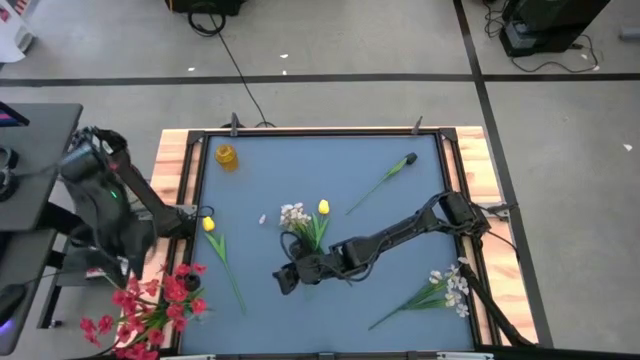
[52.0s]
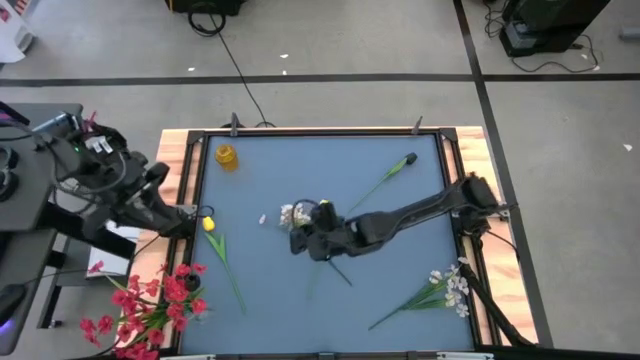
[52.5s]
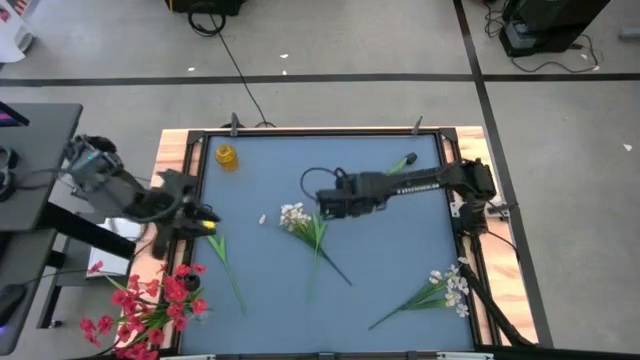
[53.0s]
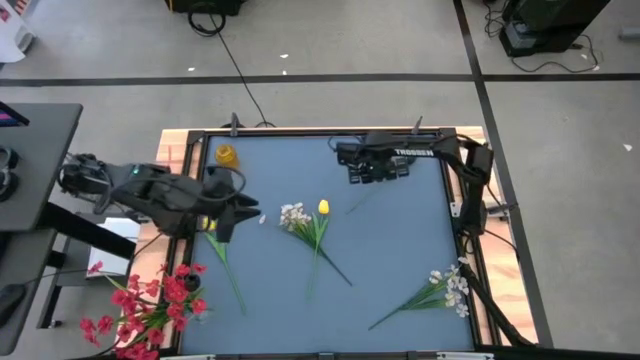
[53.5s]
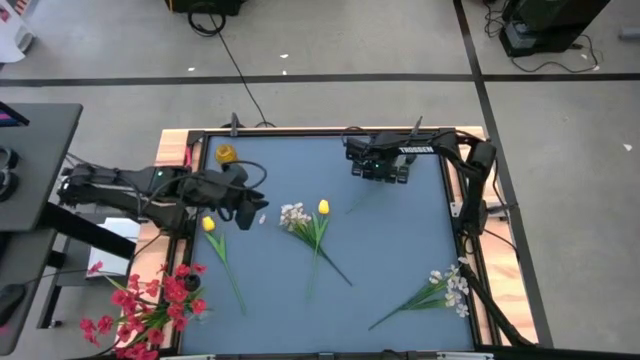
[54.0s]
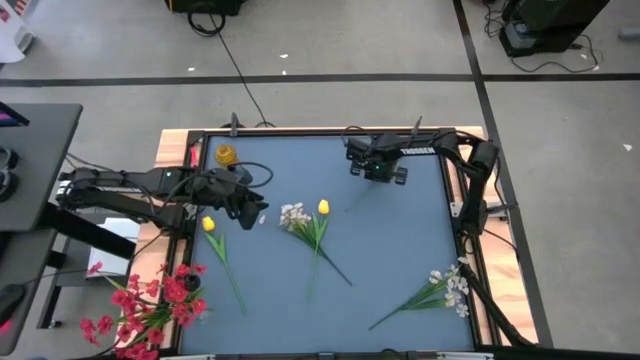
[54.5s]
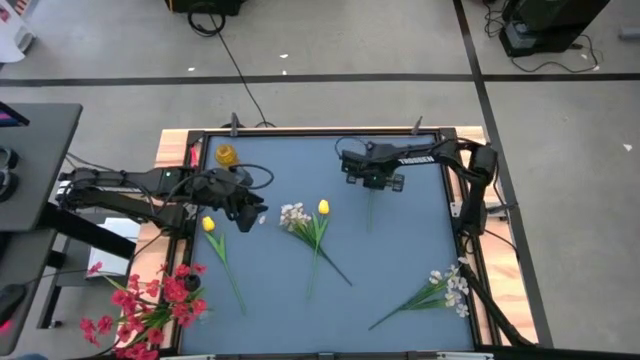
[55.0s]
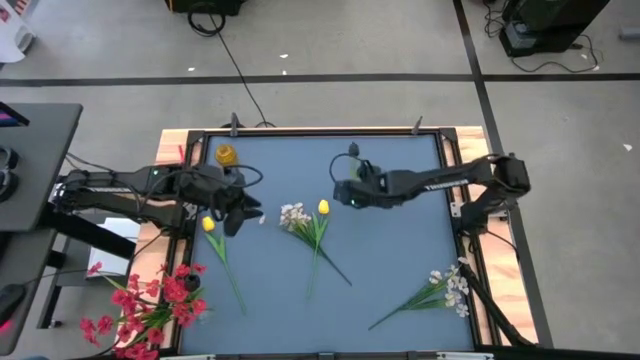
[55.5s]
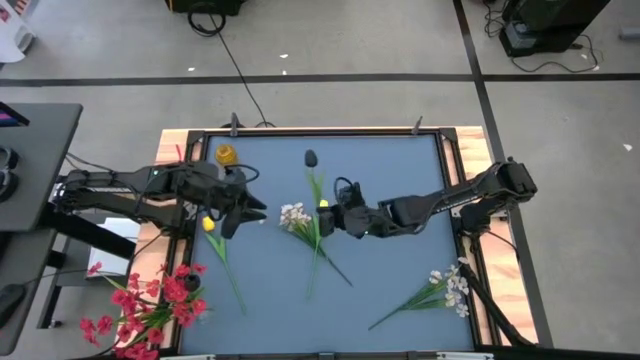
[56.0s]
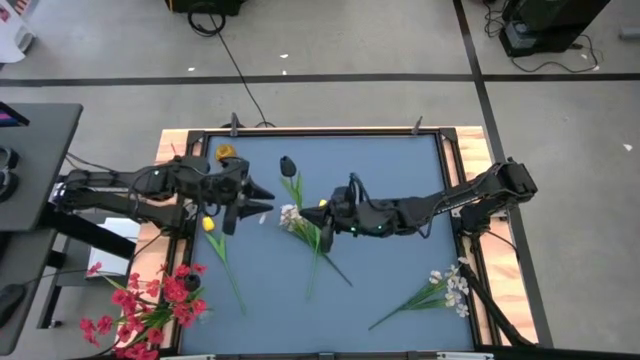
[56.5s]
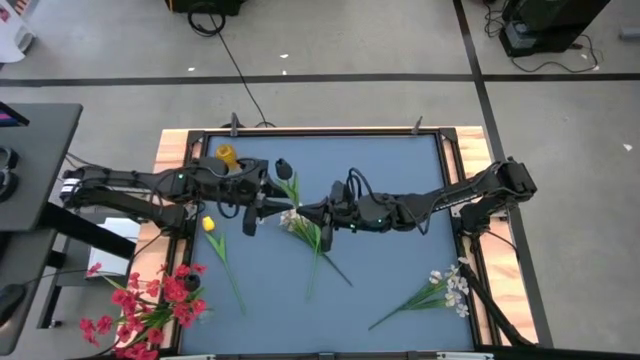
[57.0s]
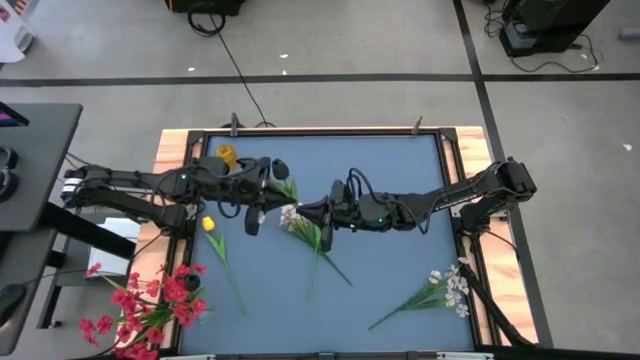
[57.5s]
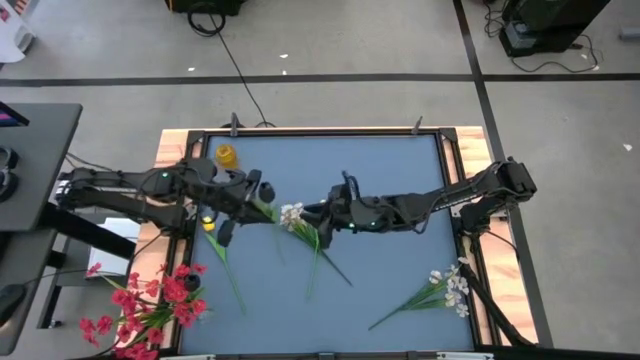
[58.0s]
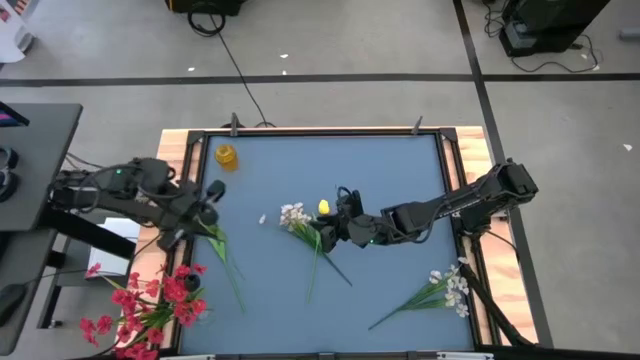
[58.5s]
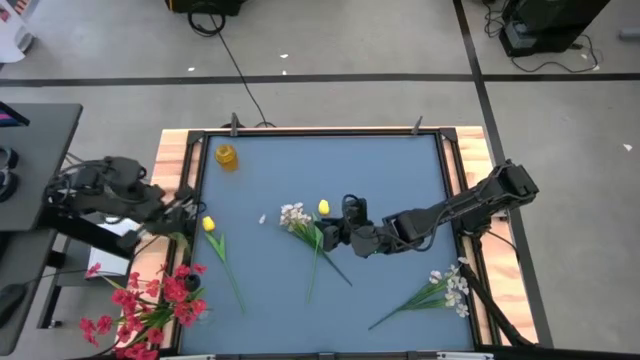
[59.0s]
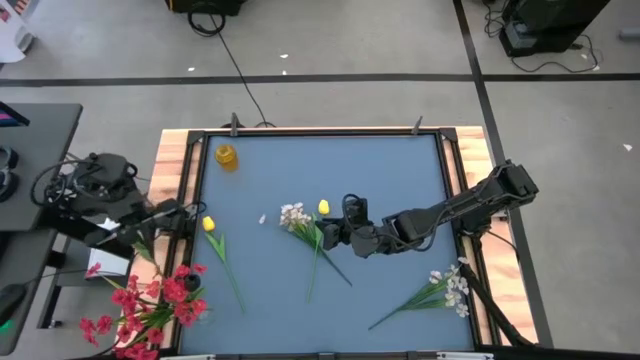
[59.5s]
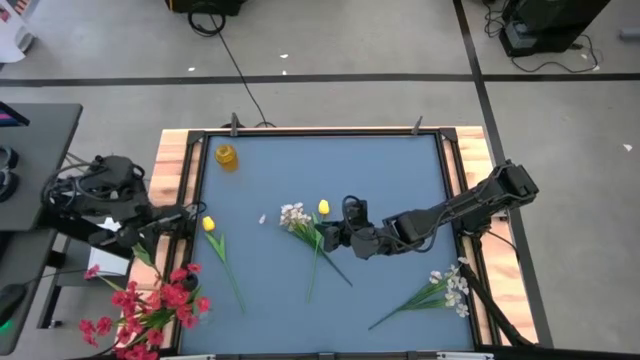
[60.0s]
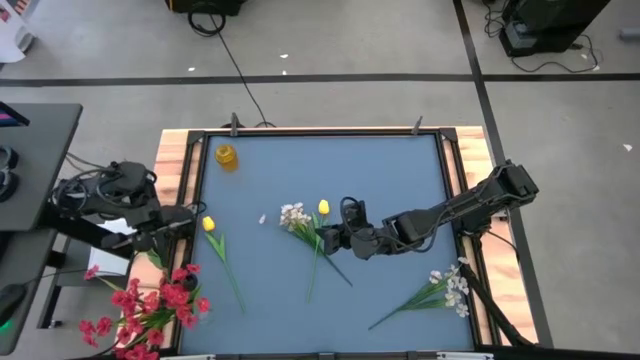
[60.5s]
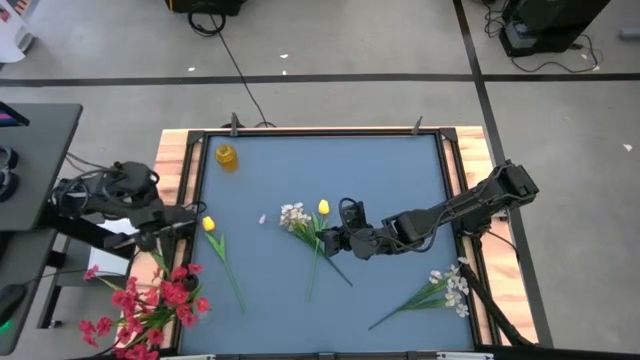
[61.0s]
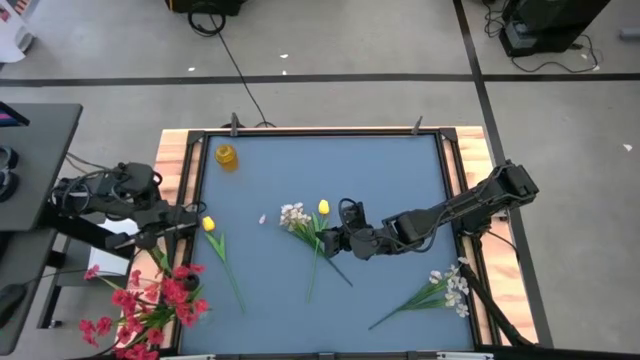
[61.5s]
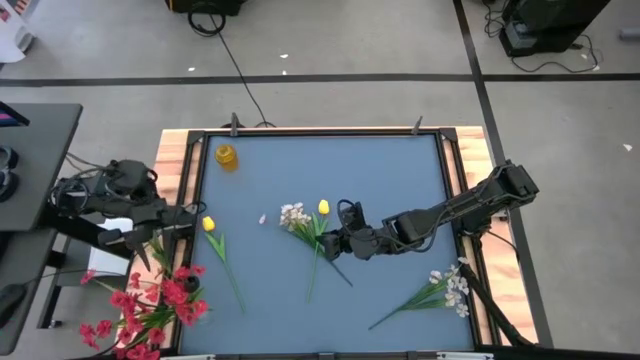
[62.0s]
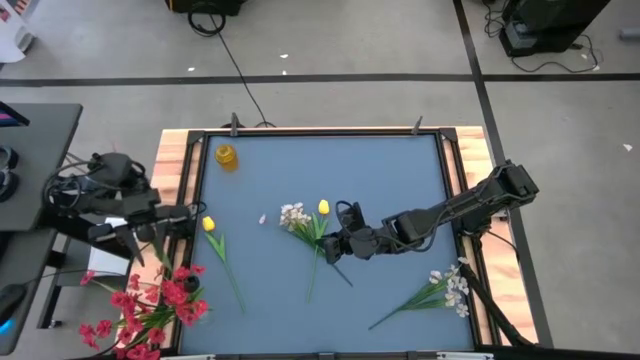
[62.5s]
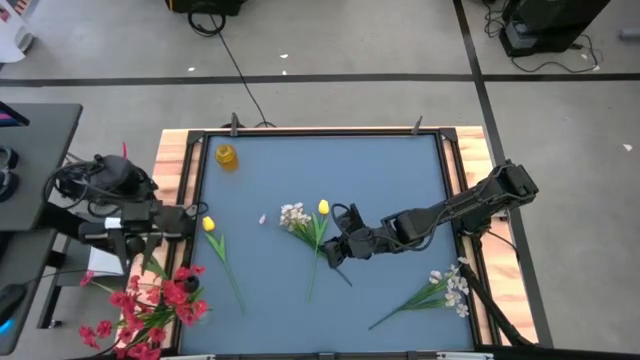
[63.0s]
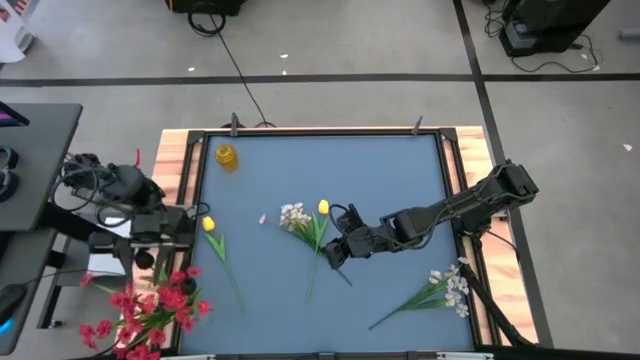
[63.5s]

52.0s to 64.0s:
Task: Sort flowers into vase by color
Put the black tulip into the transparent vase

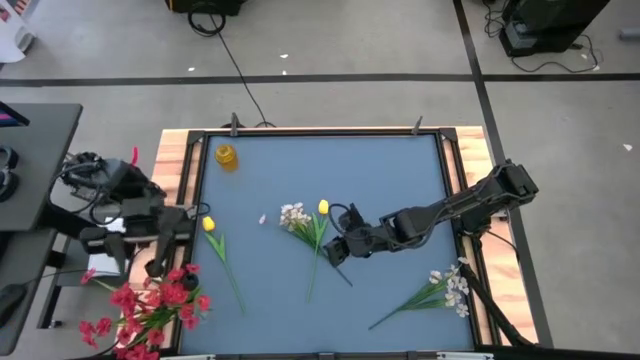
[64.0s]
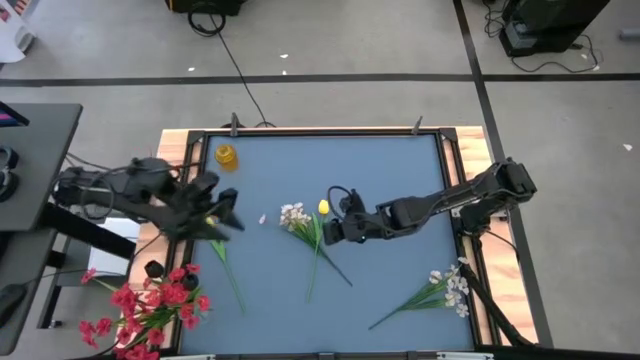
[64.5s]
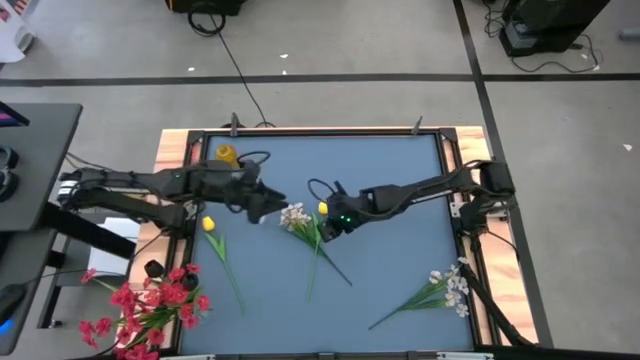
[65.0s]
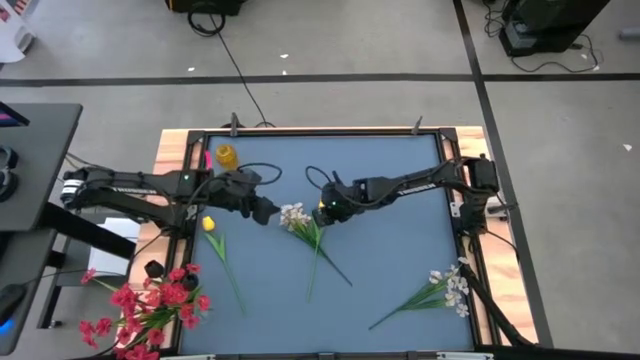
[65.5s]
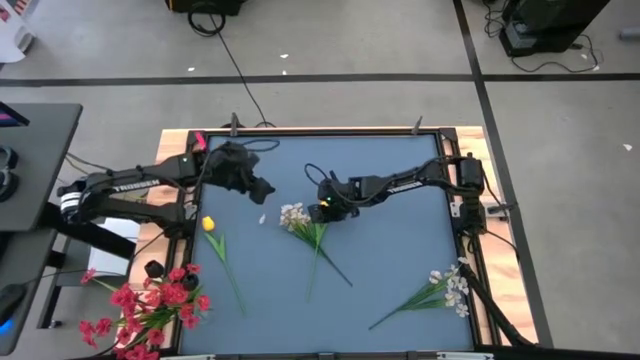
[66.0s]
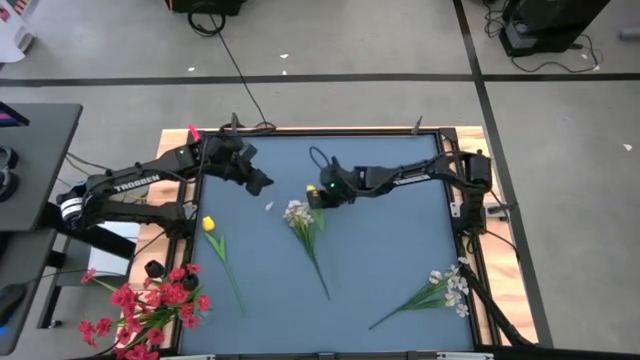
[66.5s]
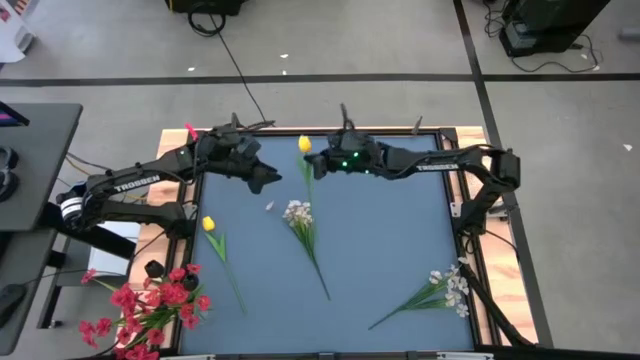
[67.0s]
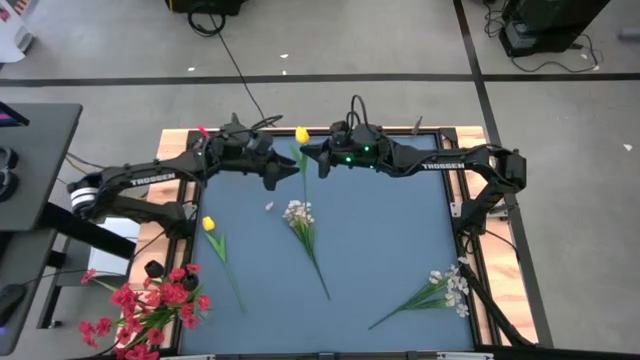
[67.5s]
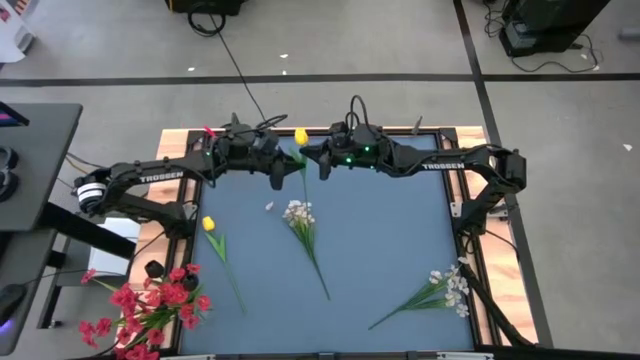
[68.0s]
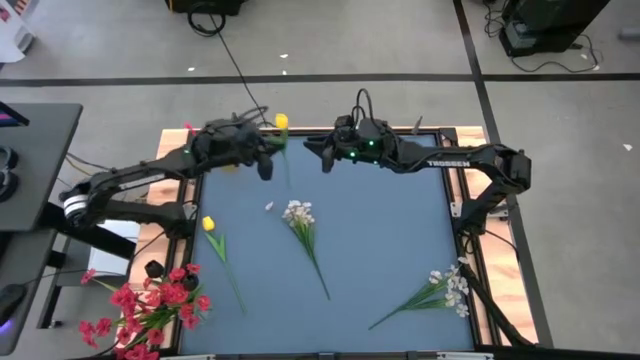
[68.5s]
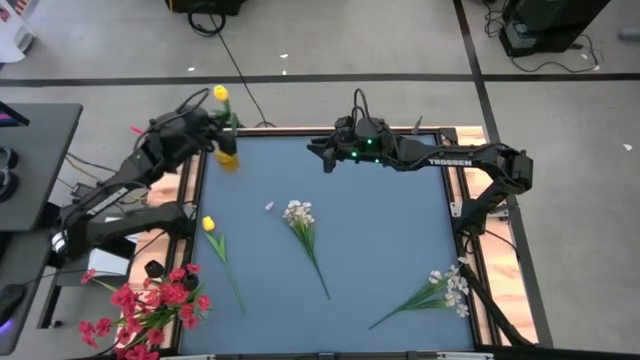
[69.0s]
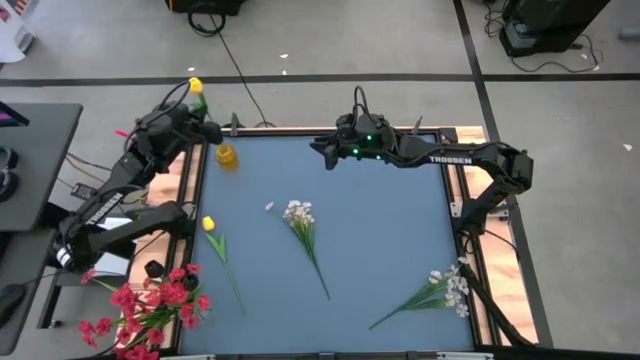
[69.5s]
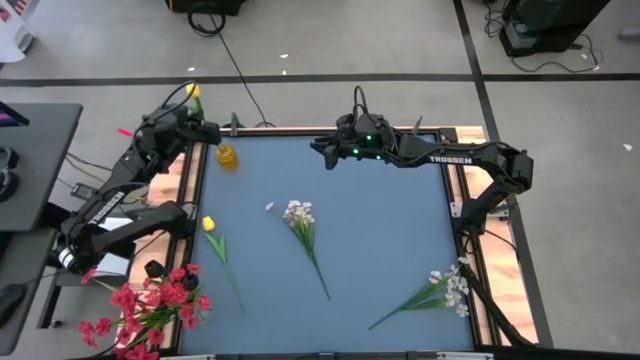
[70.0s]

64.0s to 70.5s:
Put the right yellow tulip into the yellow vase

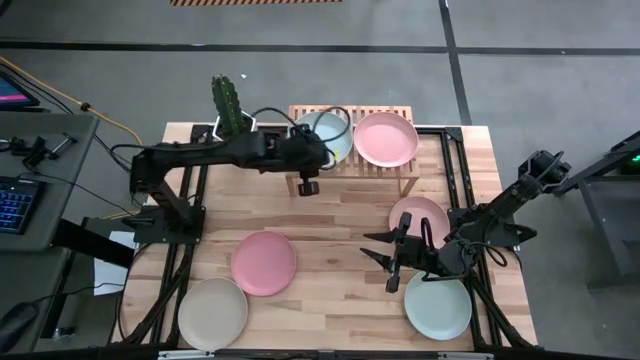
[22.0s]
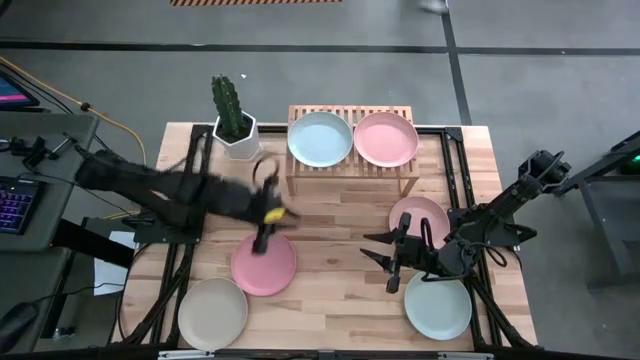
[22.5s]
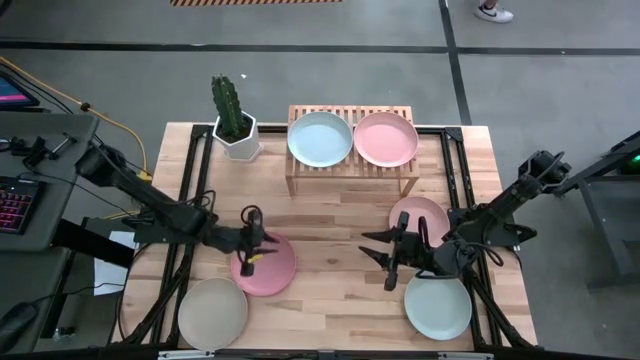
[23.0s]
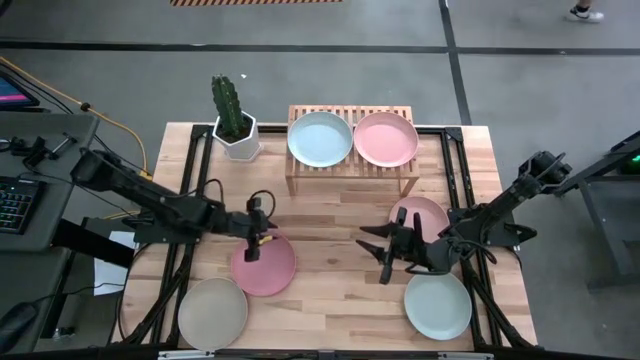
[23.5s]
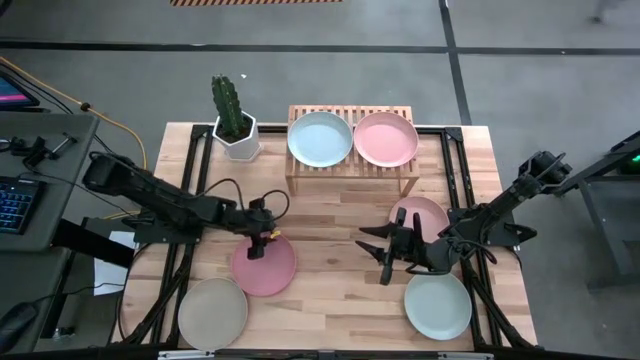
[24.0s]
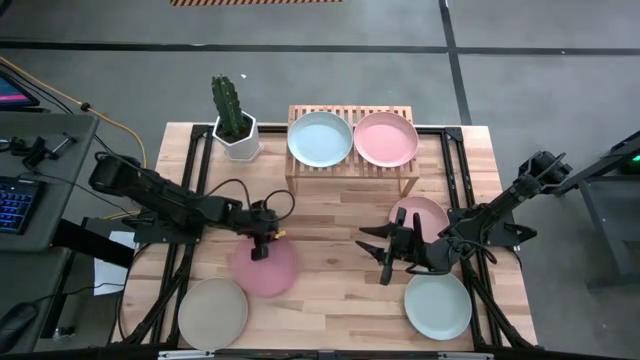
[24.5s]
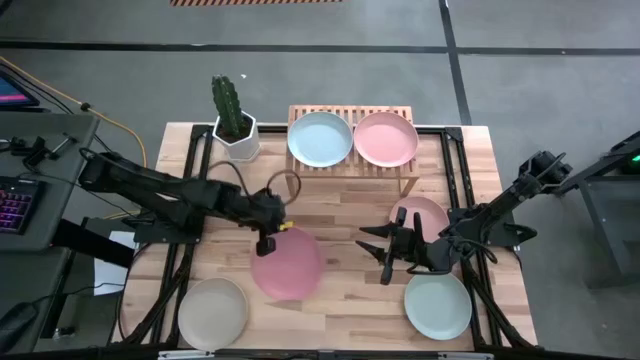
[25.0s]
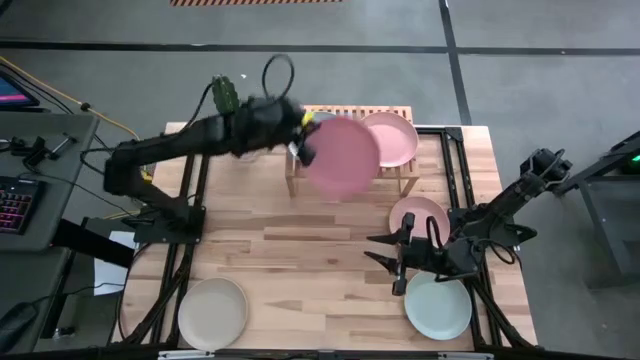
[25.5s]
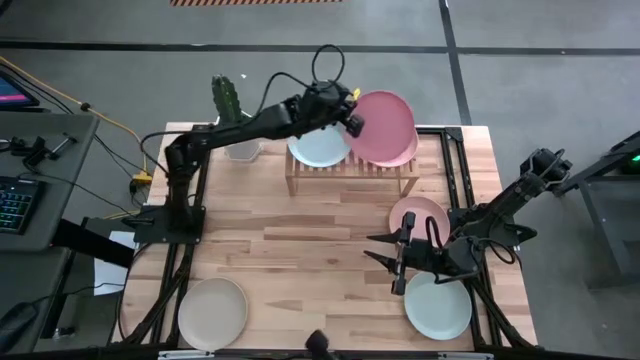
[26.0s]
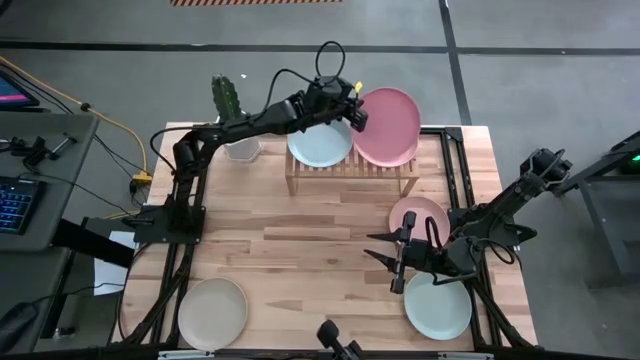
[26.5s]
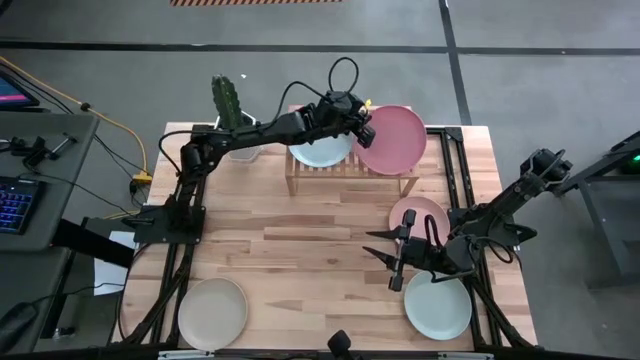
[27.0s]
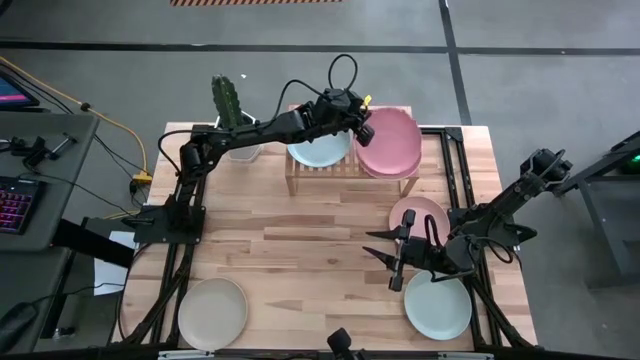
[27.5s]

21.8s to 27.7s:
Task: Place and stack plates onto a shelf
Stack the pink plate on top of the light pink plate on the shelf
